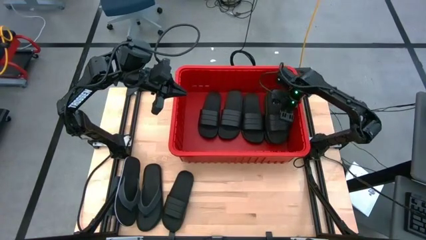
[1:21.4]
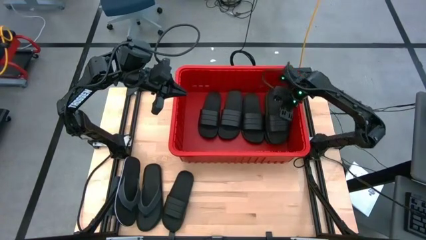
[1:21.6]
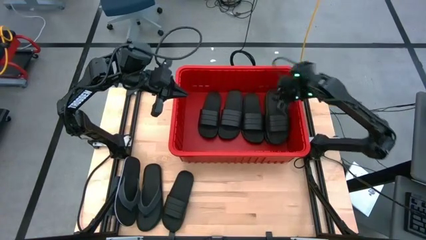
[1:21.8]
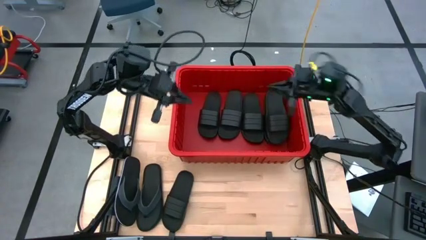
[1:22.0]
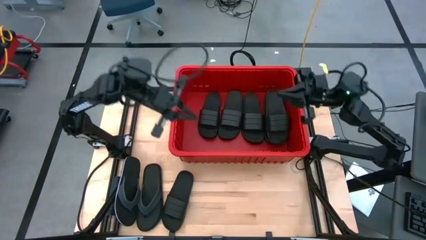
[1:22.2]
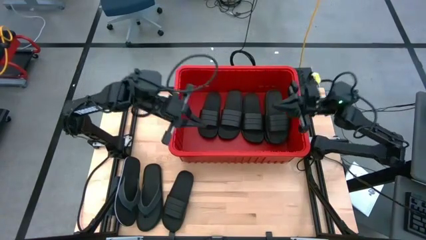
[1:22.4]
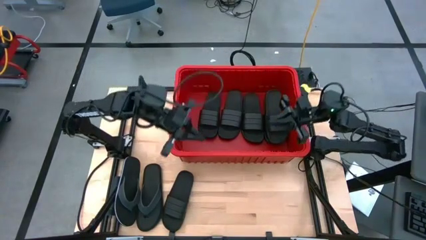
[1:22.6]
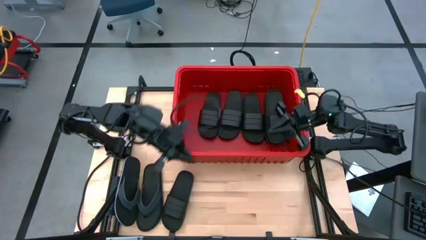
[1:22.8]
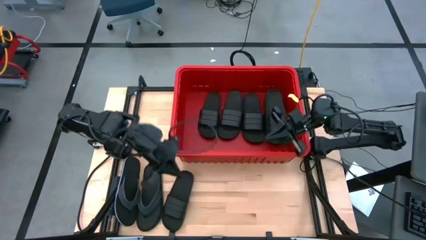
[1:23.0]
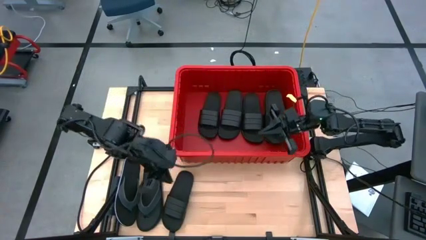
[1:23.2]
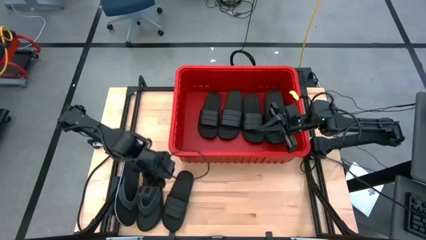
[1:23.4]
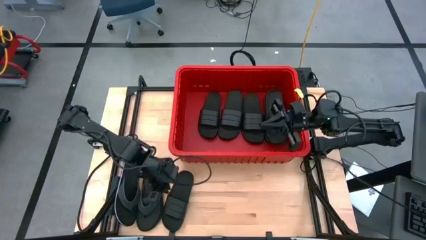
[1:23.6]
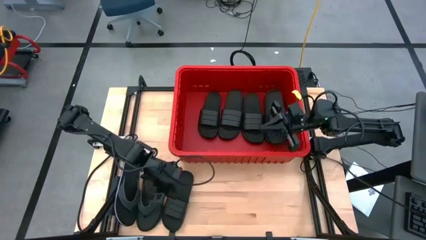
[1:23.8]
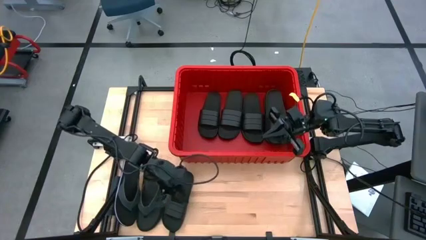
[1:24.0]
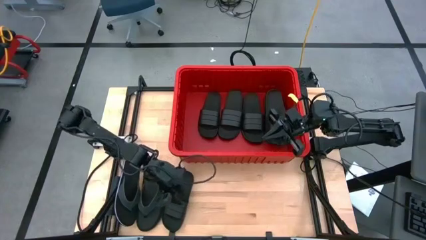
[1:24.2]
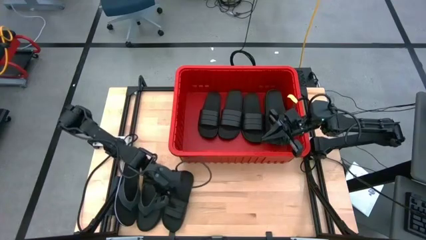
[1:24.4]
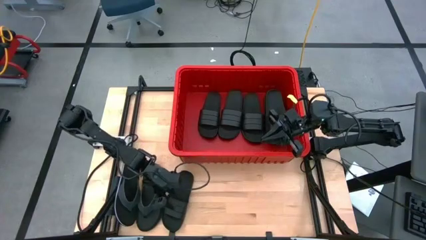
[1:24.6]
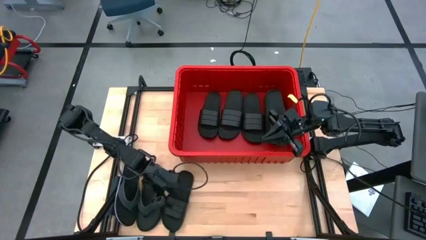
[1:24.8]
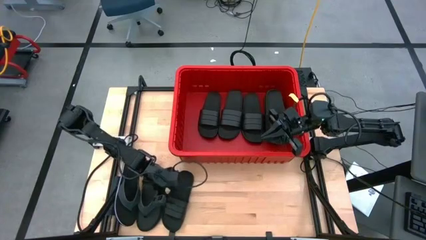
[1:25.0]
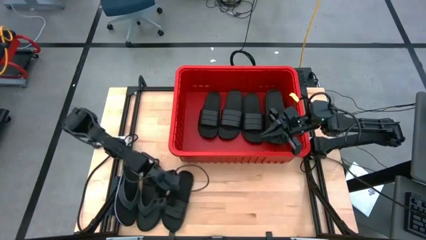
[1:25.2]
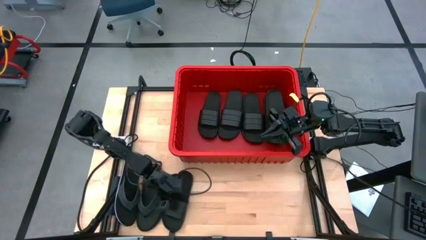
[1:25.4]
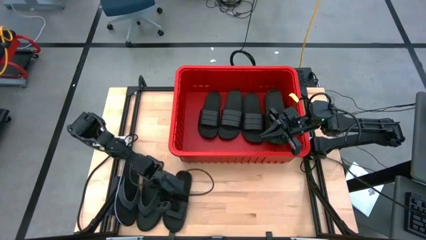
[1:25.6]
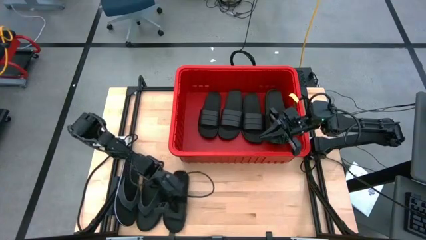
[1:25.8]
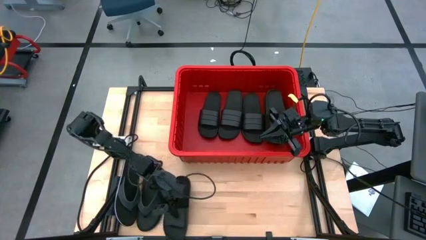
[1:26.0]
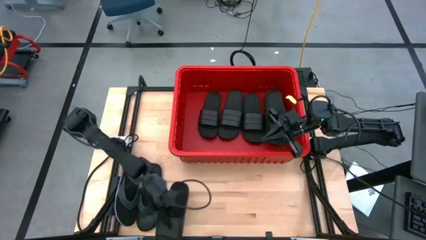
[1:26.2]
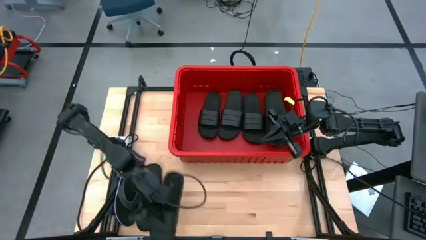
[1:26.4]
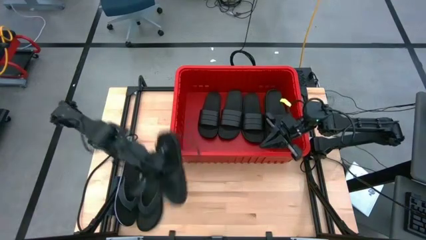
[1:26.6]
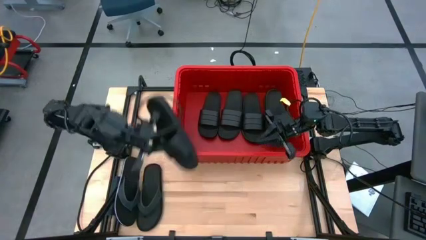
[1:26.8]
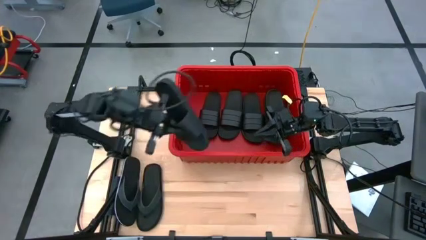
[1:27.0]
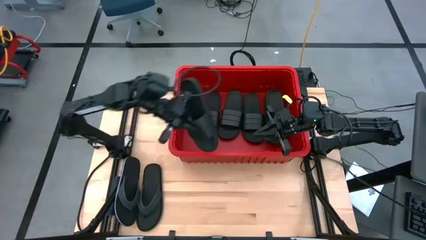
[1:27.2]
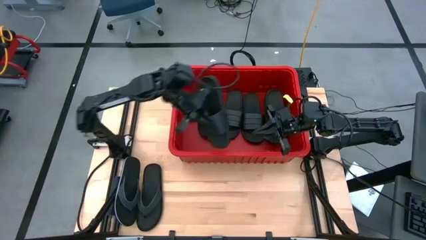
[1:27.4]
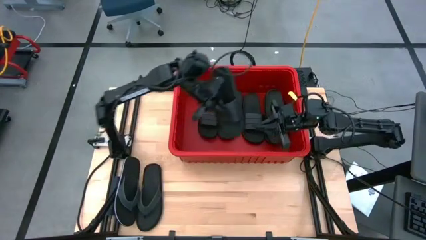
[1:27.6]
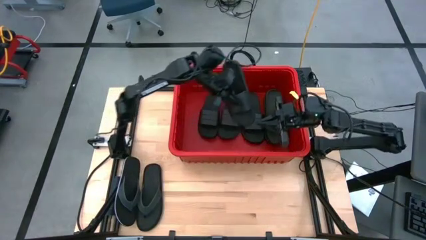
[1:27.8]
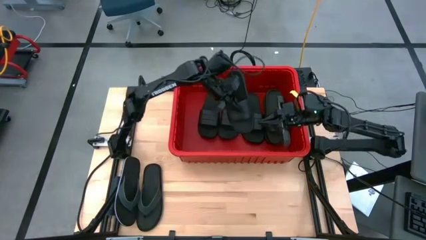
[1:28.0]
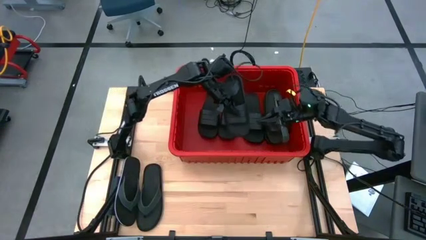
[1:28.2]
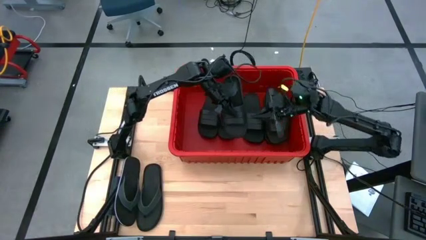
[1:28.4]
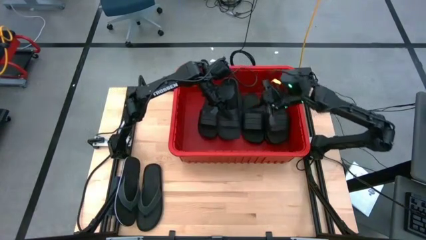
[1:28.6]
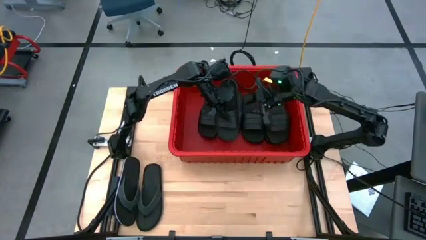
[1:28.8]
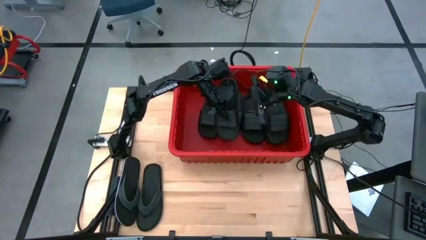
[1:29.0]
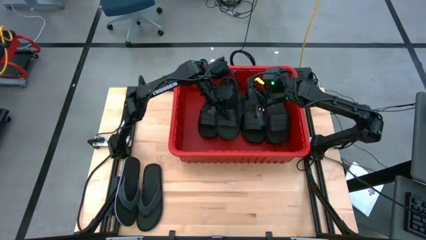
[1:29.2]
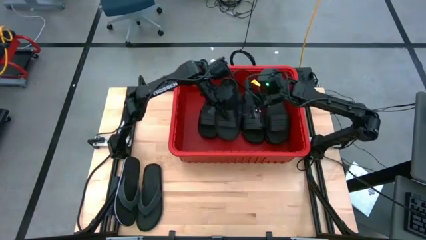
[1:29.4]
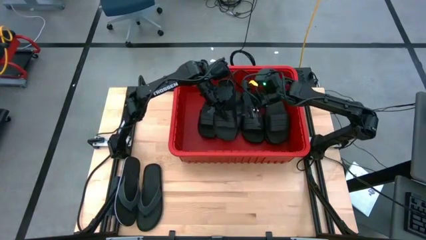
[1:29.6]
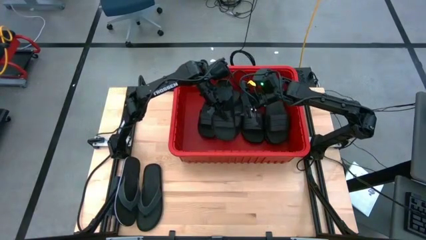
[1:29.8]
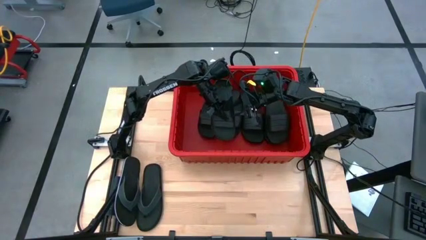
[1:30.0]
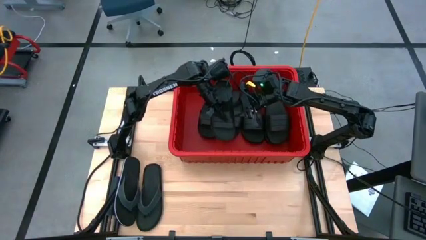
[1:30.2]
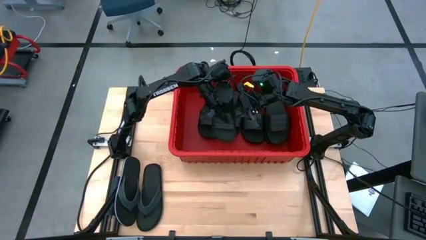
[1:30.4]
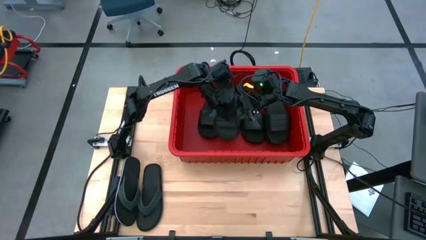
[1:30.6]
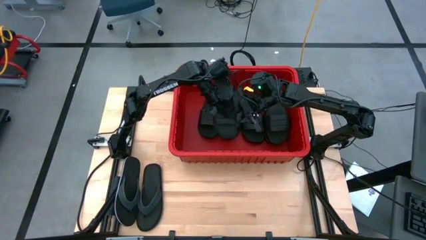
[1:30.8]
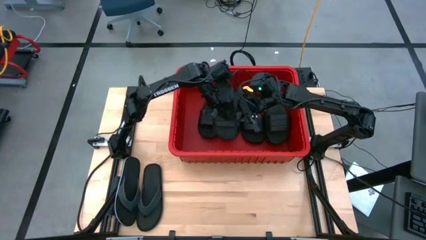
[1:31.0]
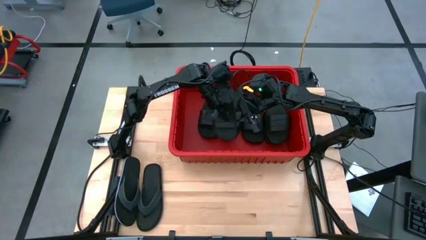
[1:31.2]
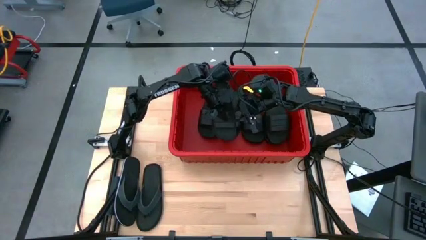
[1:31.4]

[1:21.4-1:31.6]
Task: Pick and place slides into bin
Put the black slide on top of the other black slide into the red bin

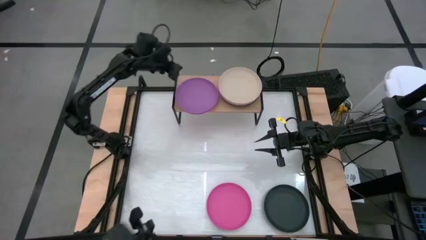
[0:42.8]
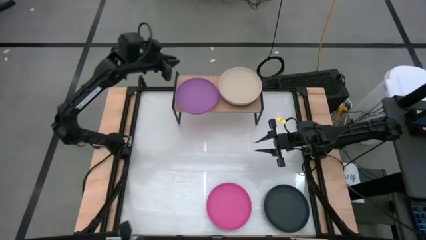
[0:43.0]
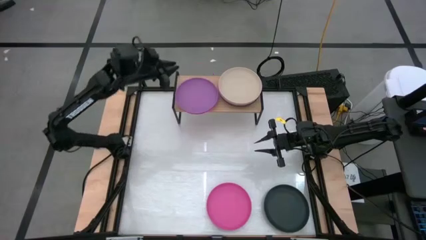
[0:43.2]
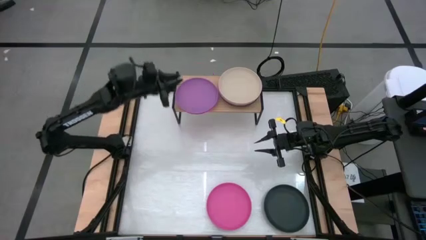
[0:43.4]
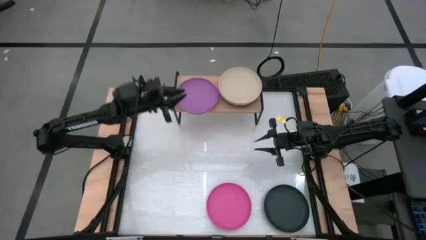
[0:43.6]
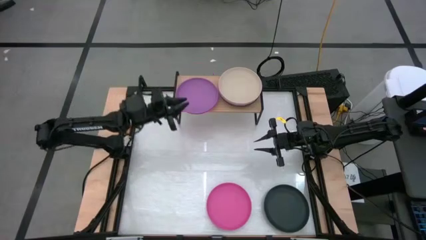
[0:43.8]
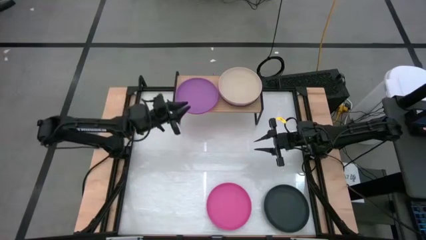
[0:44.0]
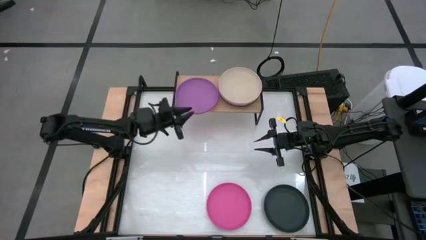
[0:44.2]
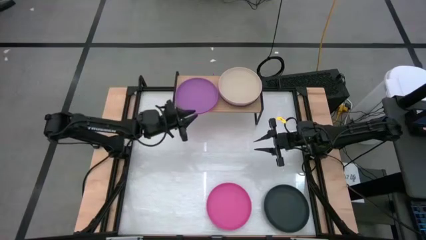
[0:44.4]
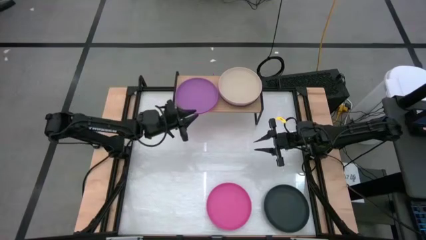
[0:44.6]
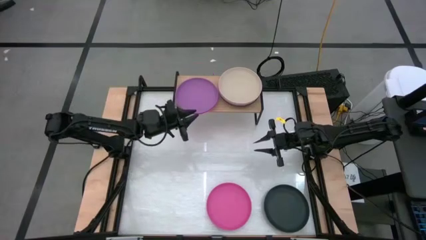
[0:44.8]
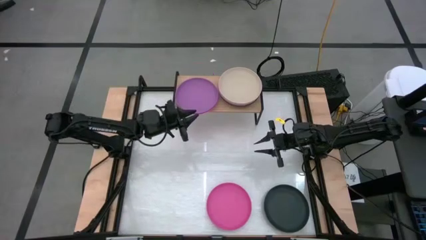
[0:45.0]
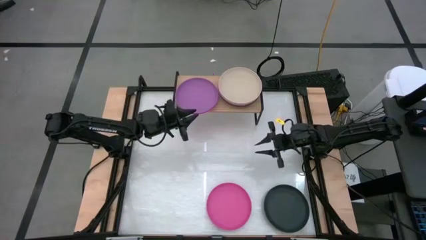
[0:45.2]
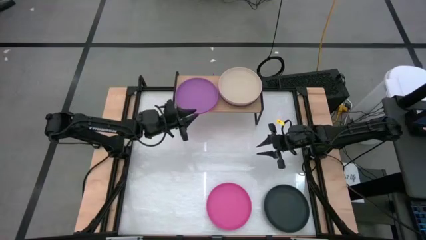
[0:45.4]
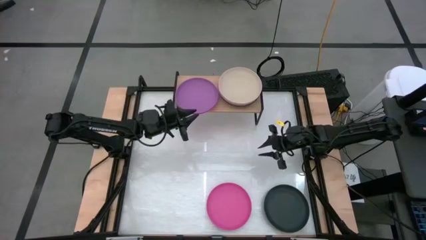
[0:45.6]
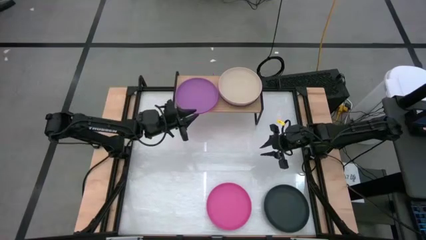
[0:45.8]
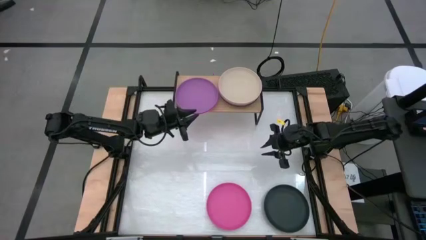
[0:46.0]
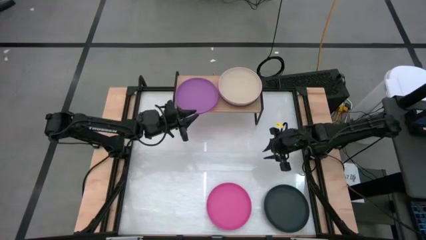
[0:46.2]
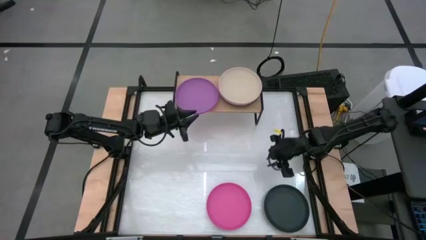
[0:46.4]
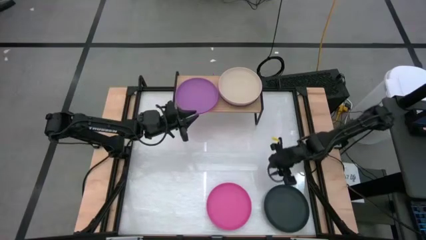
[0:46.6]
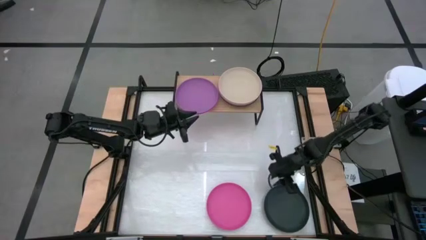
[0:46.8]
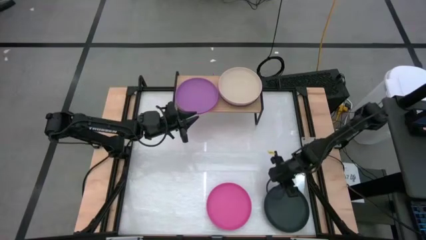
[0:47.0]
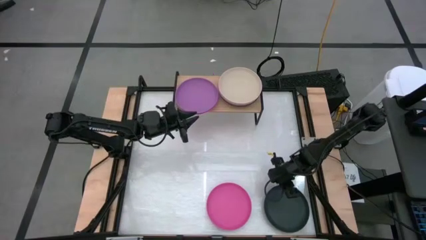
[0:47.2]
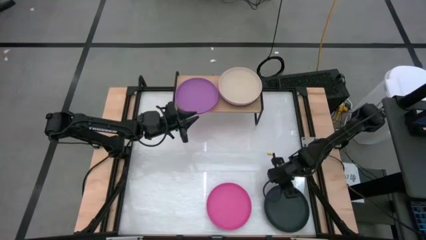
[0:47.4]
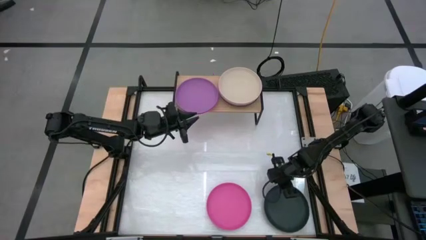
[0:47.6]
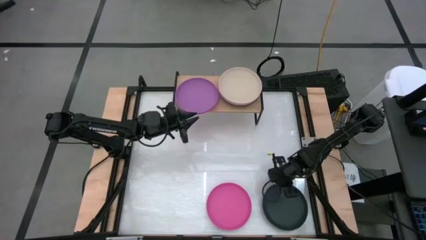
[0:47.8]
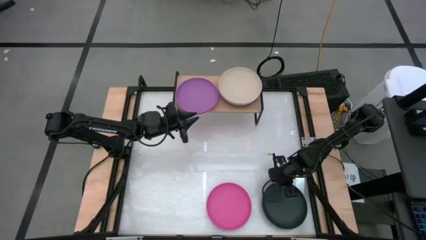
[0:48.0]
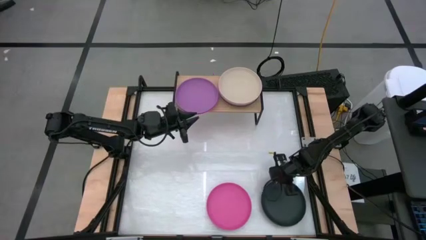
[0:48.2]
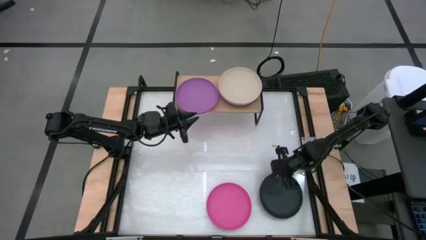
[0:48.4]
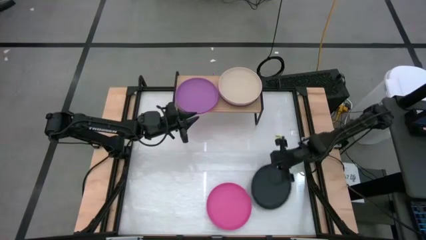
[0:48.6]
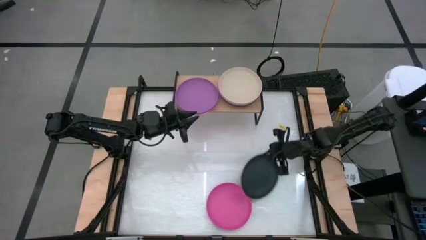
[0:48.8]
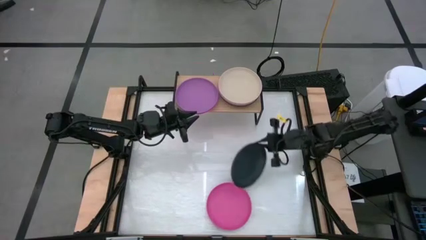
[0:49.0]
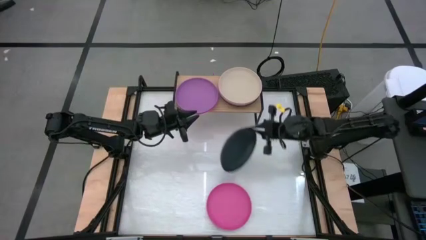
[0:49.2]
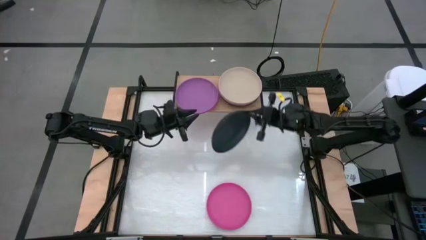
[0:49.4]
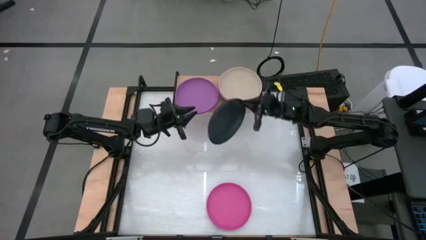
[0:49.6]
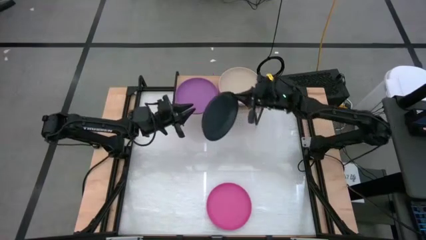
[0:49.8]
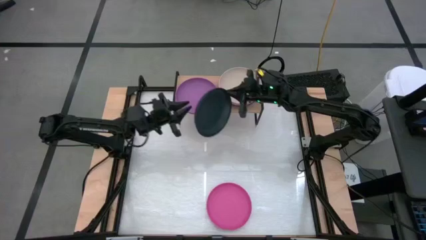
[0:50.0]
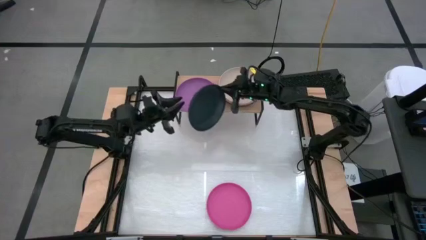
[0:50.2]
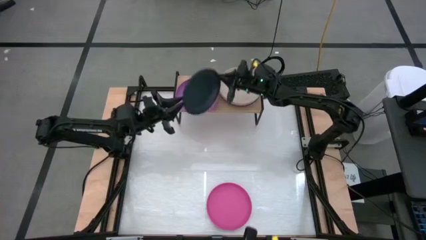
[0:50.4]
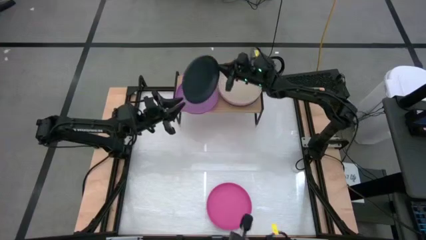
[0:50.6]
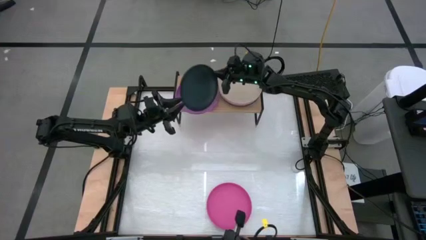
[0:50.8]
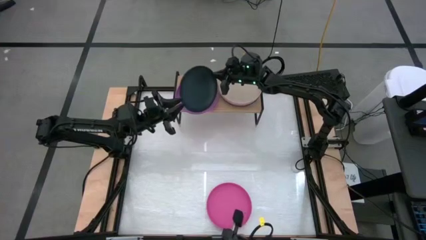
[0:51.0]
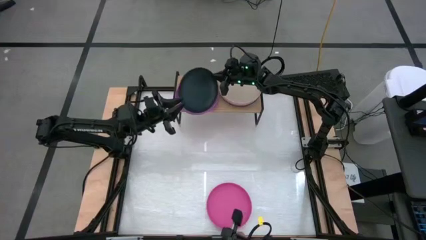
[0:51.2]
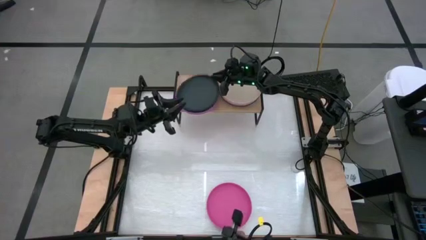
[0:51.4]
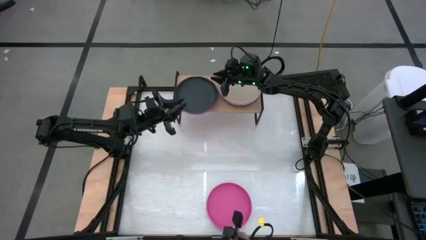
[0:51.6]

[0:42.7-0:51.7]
Task: Place and stack plates onto a shelf
Stack the black plate on top of the violet plate on the shelf
